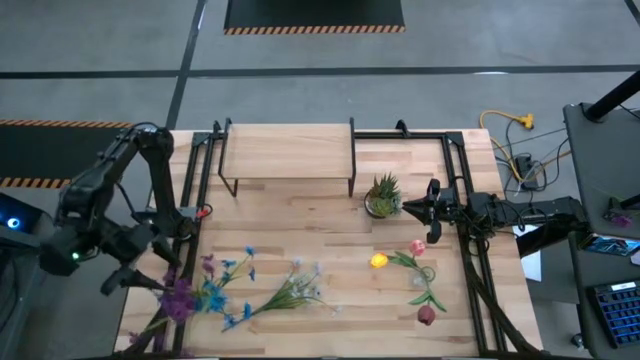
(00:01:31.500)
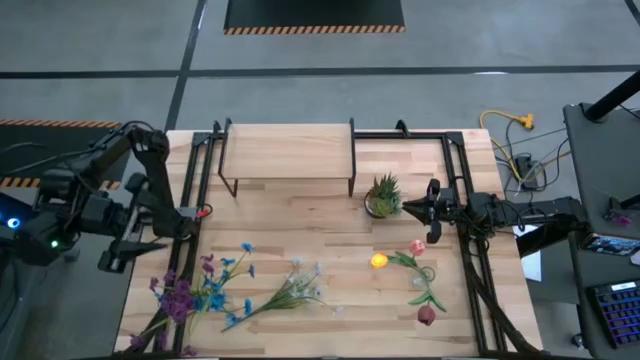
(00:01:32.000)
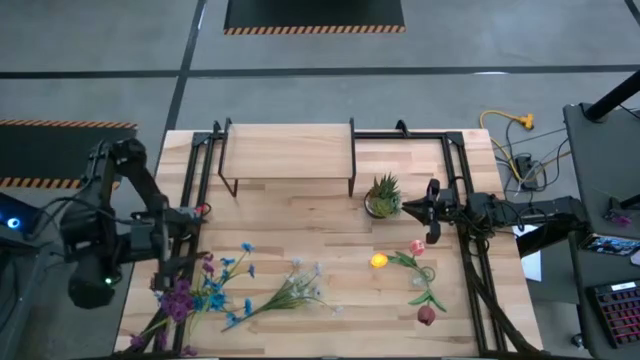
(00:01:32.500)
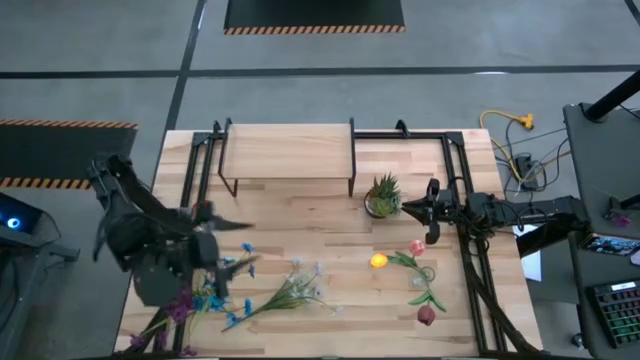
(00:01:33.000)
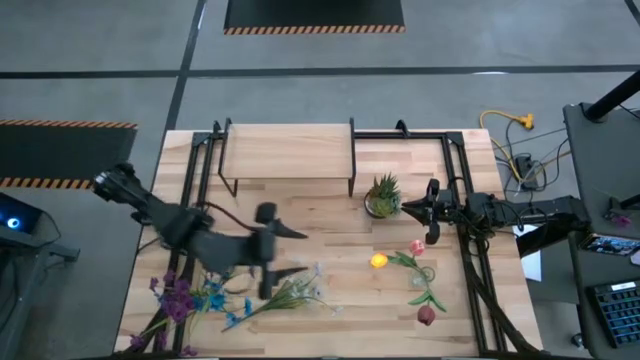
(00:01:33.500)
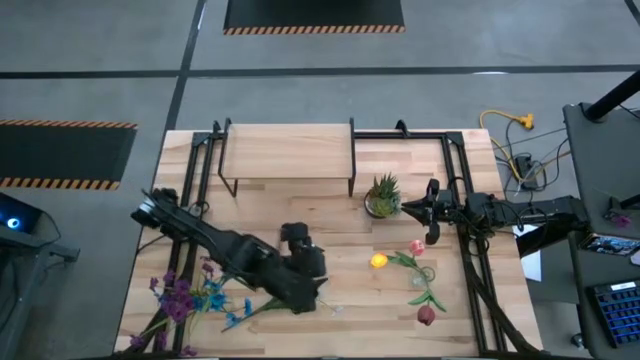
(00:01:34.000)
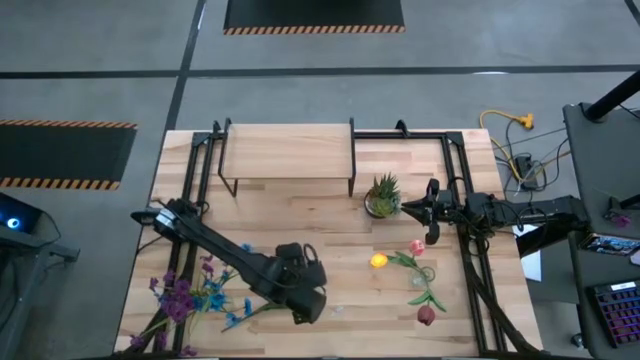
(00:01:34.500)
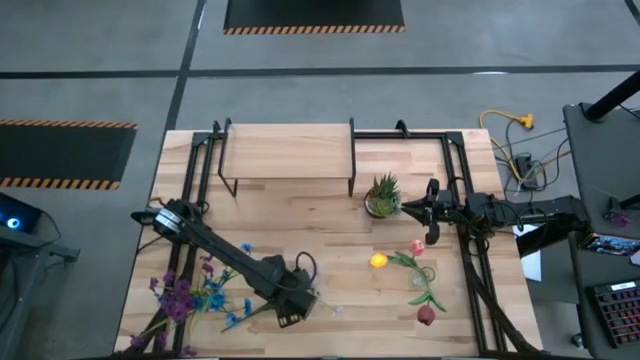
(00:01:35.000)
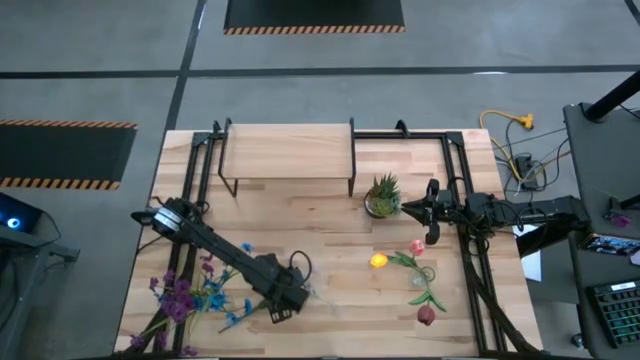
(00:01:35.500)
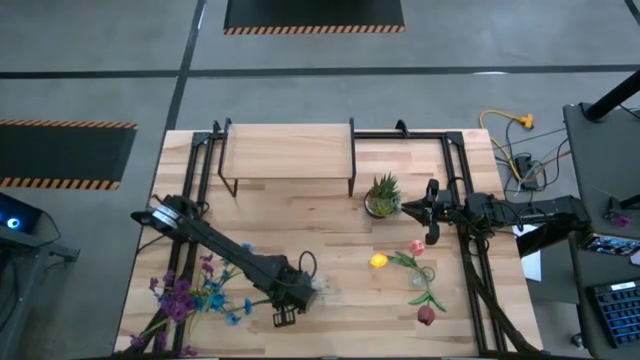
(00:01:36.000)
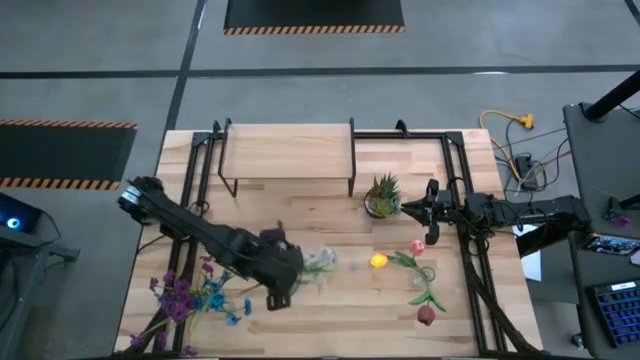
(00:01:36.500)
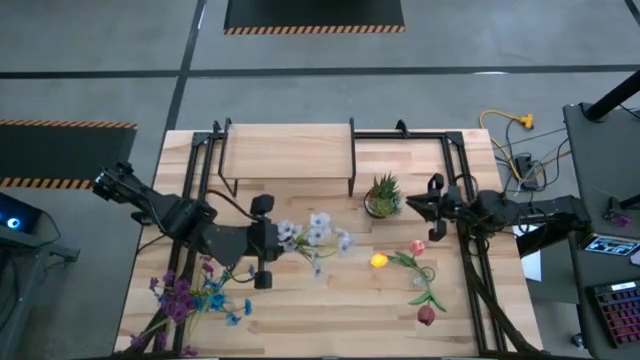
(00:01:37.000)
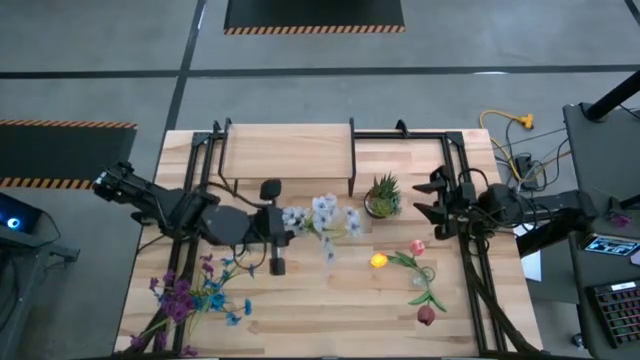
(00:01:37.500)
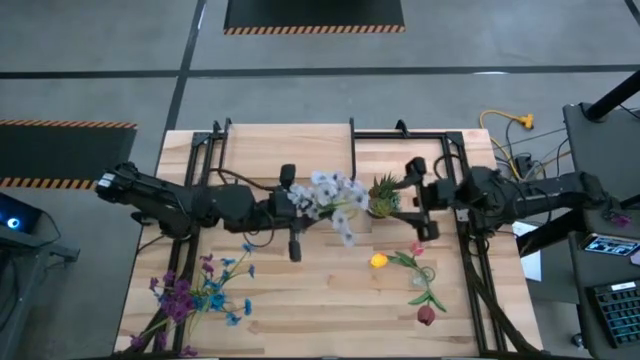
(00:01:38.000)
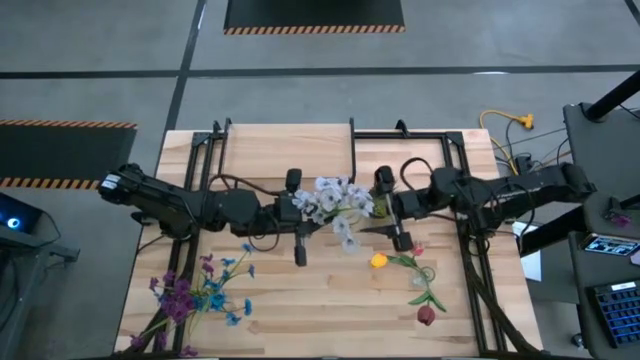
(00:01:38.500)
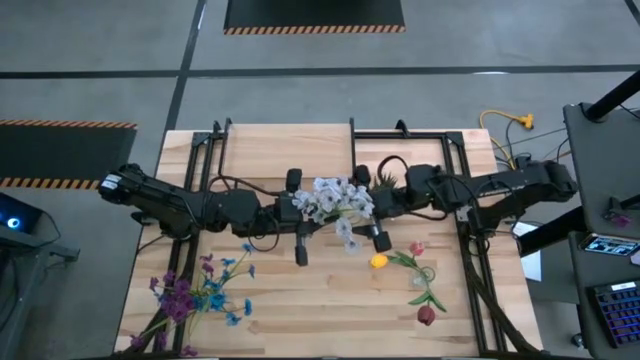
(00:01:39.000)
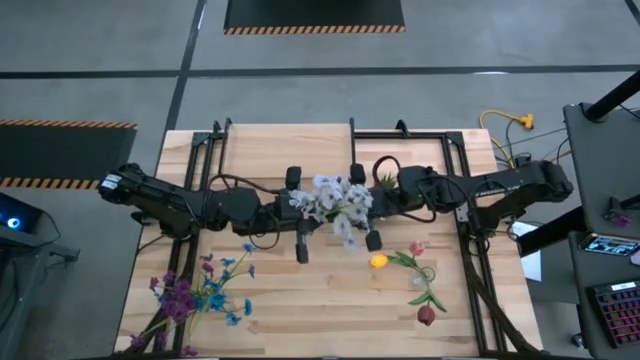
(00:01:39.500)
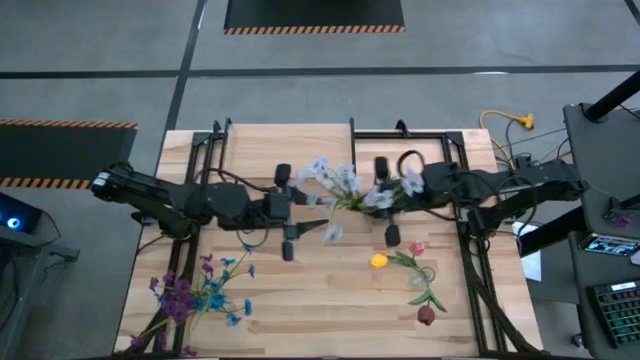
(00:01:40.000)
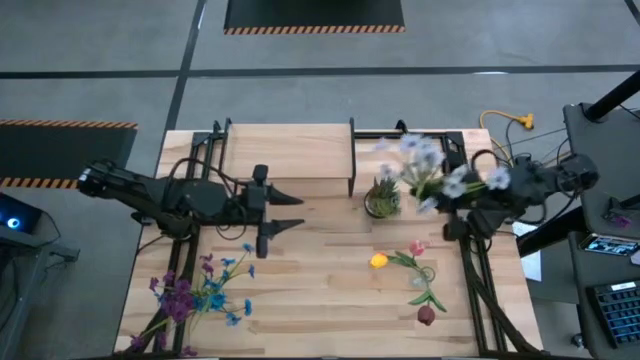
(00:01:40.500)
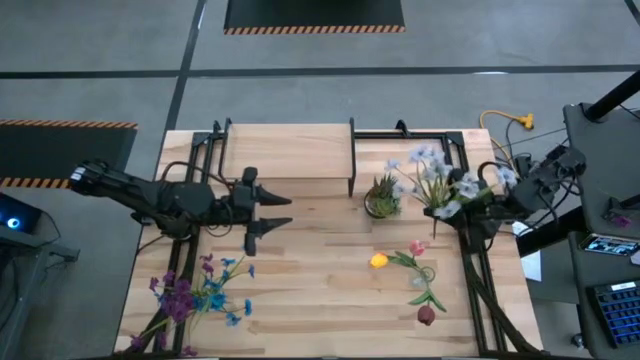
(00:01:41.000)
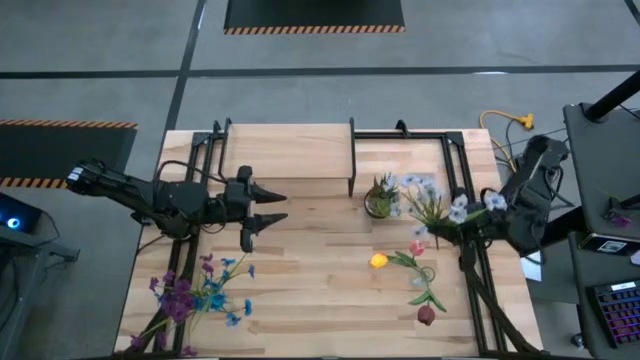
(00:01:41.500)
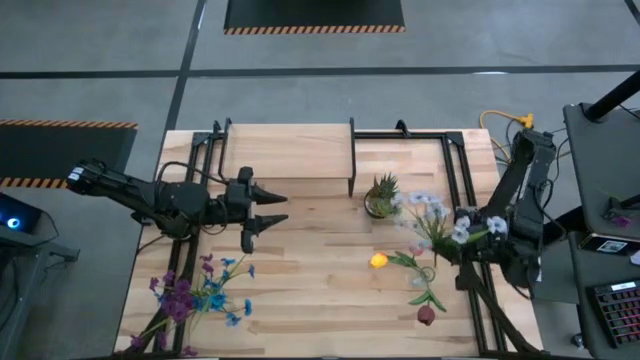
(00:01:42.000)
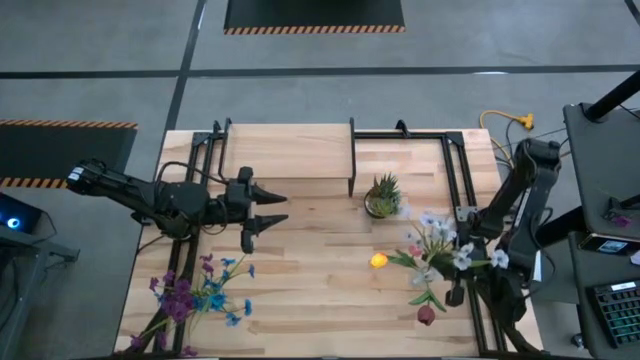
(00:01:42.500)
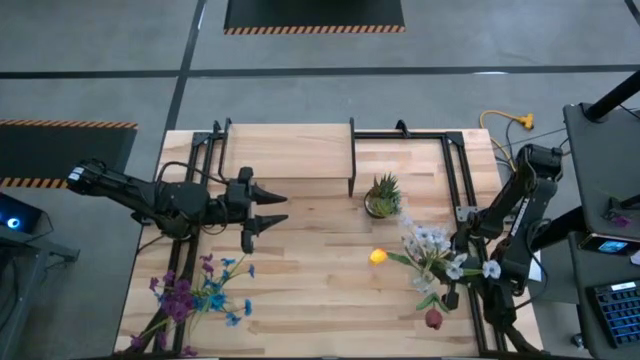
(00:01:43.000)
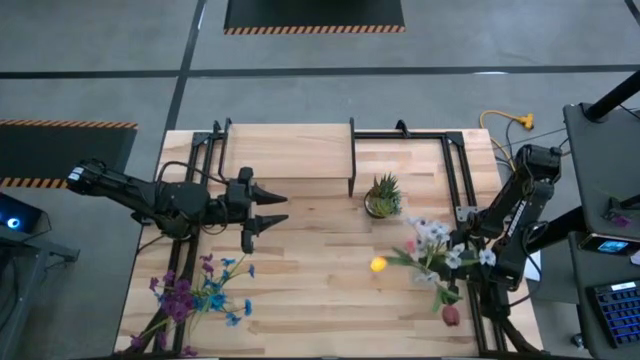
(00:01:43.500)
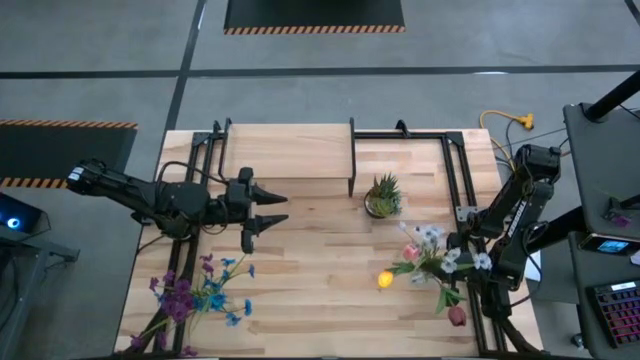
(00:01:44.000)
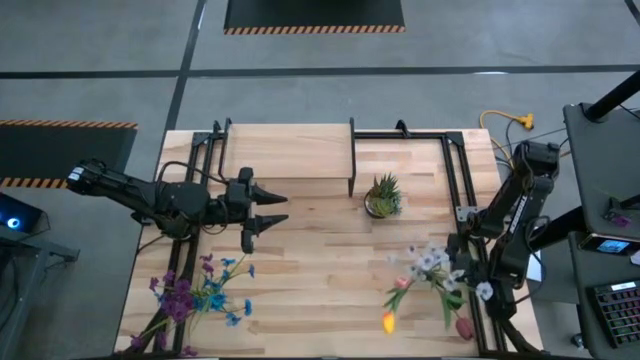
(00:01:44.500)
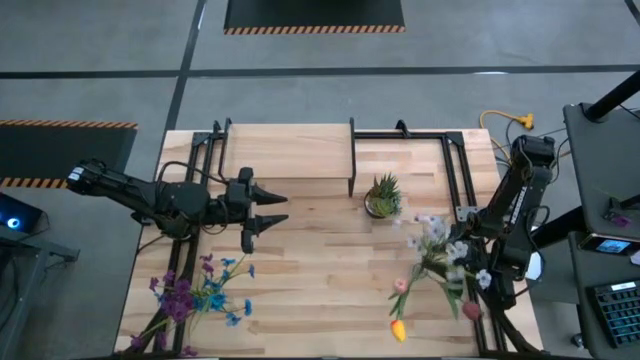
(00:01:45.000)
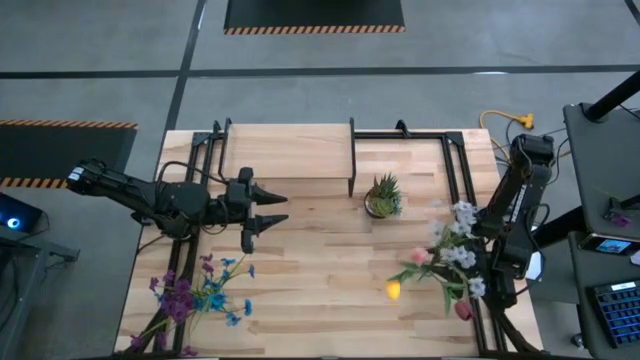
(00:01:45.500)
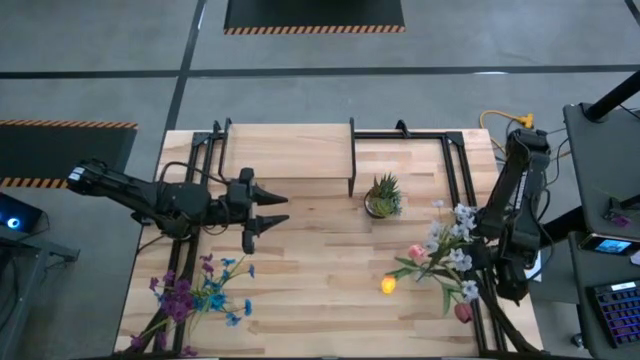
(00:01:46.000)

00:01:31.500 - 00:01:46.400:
Task: Pick and place flowers into a vace then onto a shelf
Put the white flowers into the right transparent vase

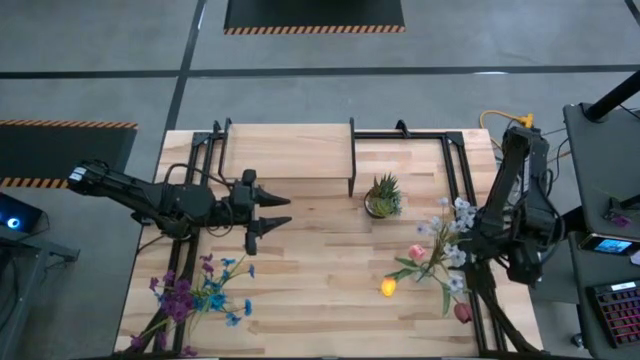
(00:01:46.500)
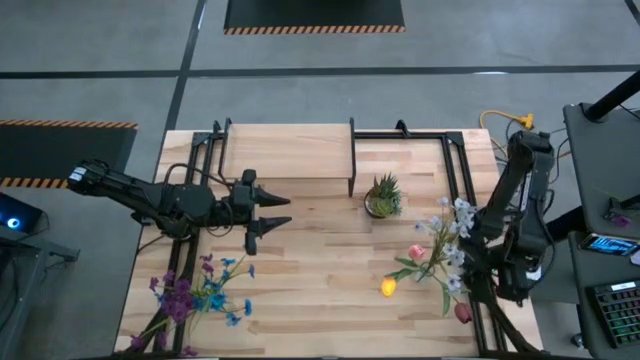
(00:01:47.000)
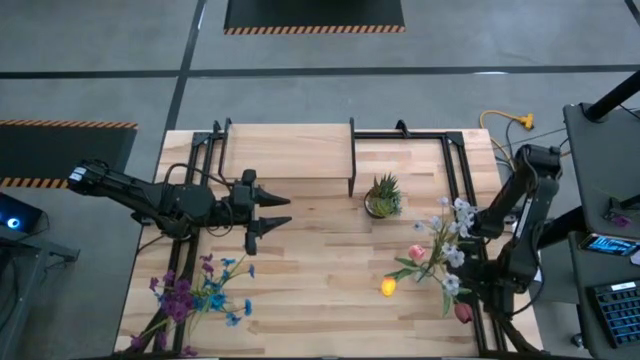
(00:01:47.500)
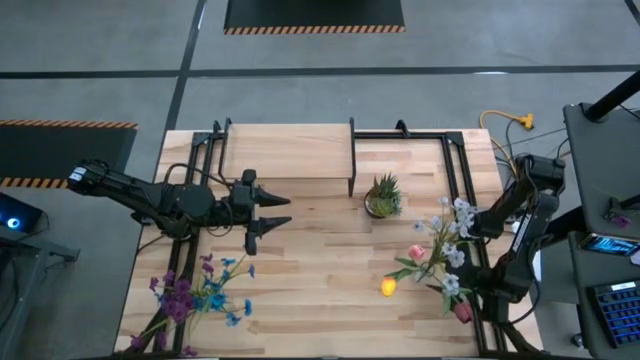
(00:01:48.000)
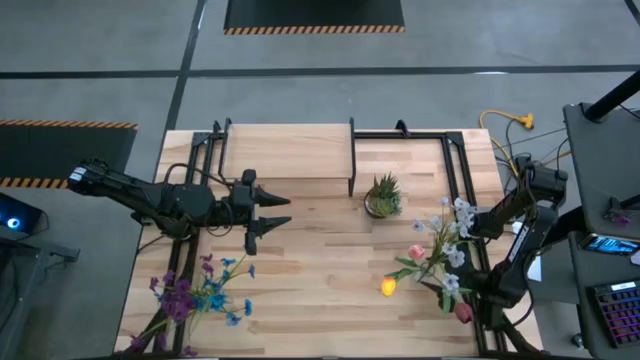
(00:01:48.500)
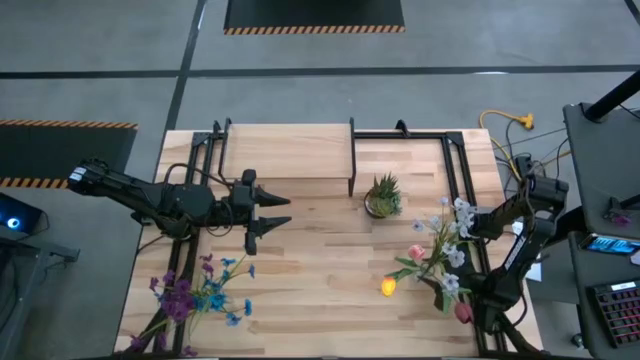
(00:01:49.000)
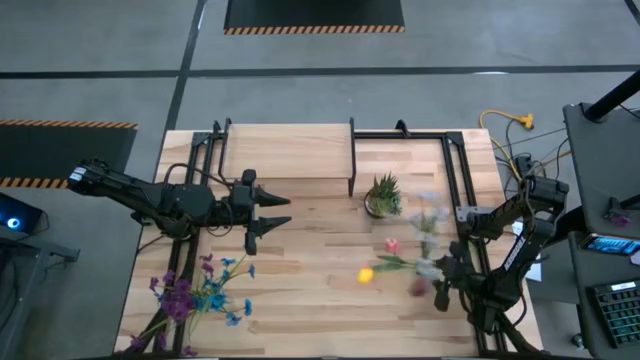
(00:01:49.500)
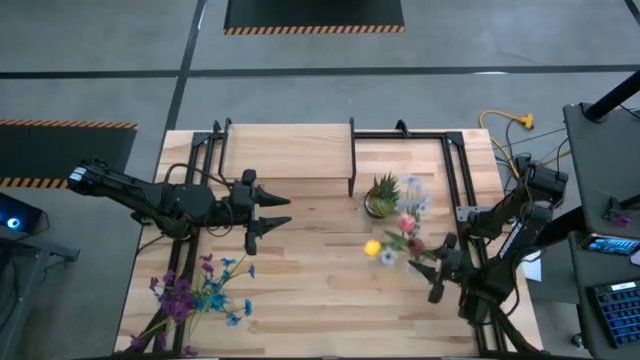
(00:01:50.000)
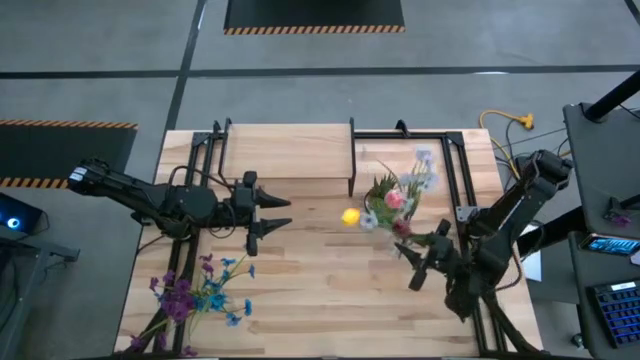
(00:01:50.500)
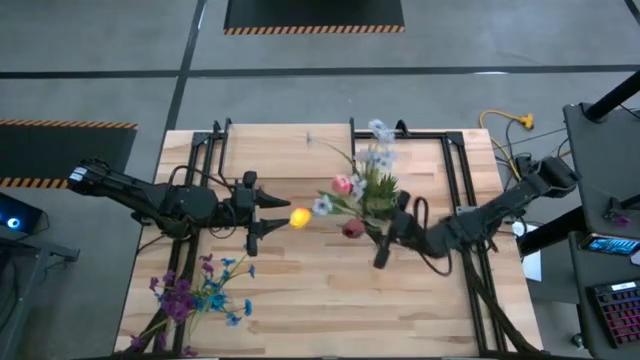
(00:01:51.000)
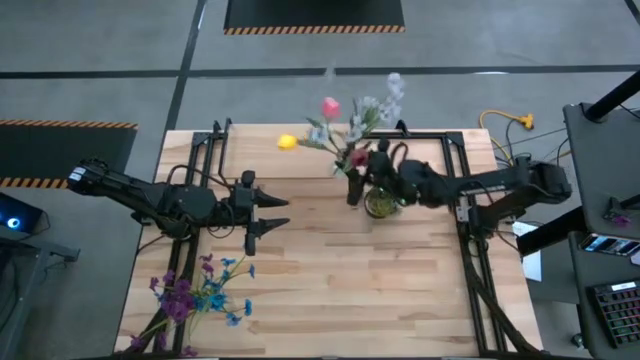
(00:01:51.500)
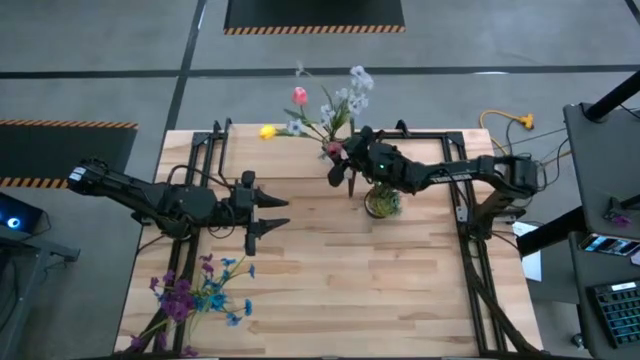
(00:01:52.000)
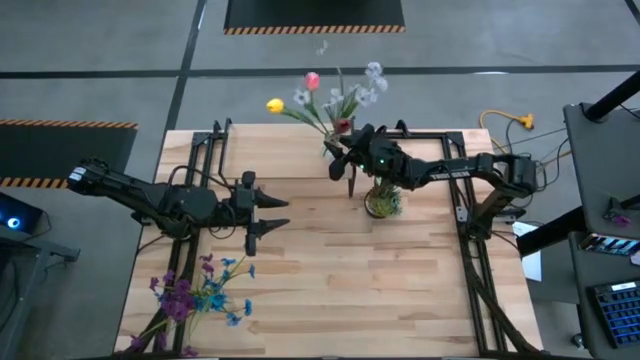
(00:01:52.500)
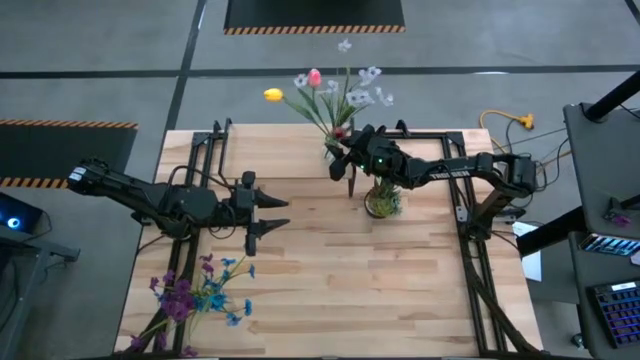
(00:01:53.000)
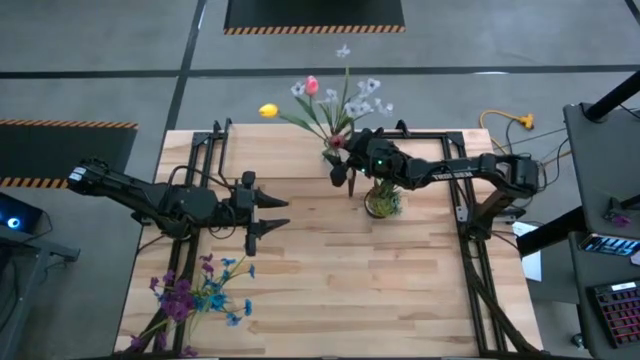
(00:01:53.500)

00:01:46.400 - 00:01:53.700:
Put the right transparent flower vase on the shelf
